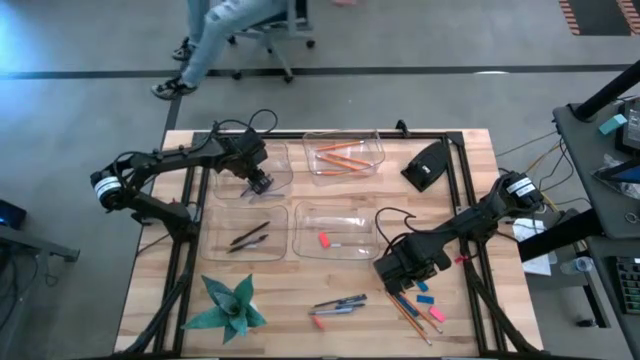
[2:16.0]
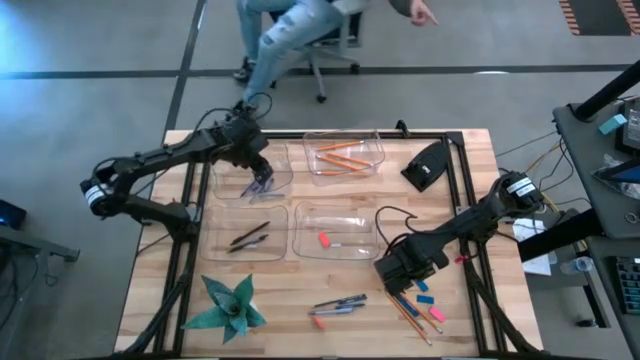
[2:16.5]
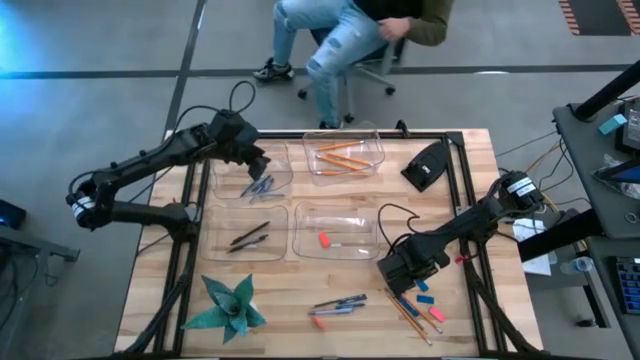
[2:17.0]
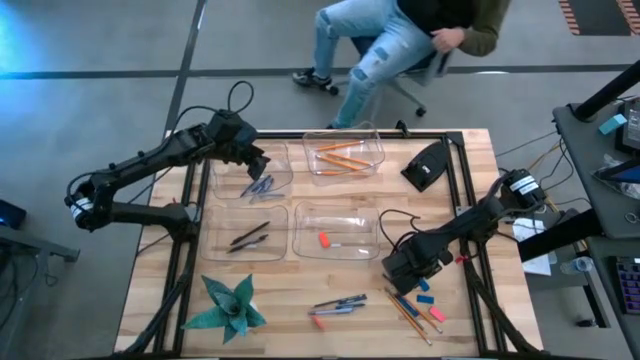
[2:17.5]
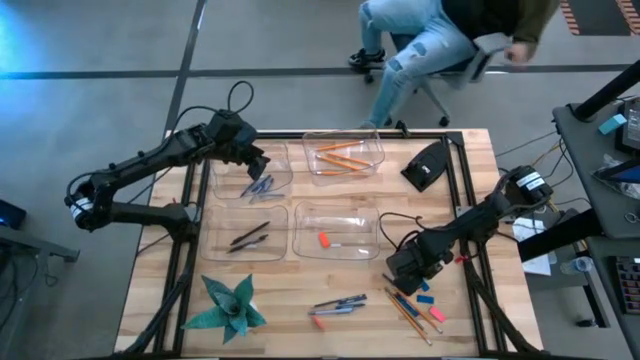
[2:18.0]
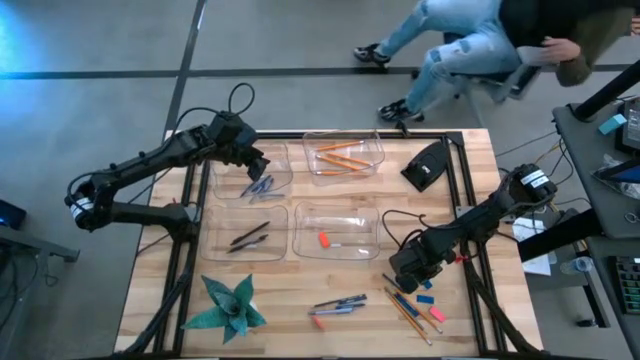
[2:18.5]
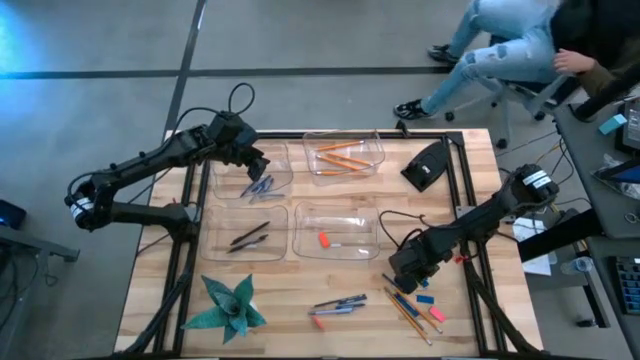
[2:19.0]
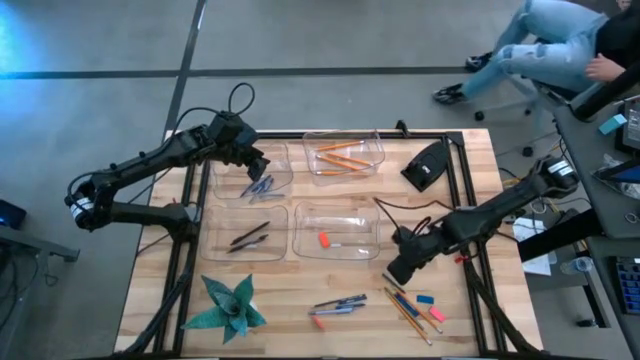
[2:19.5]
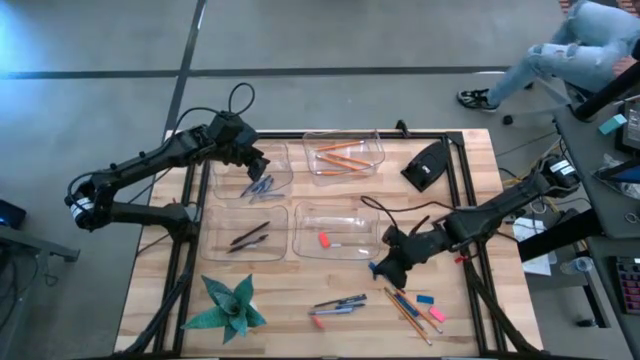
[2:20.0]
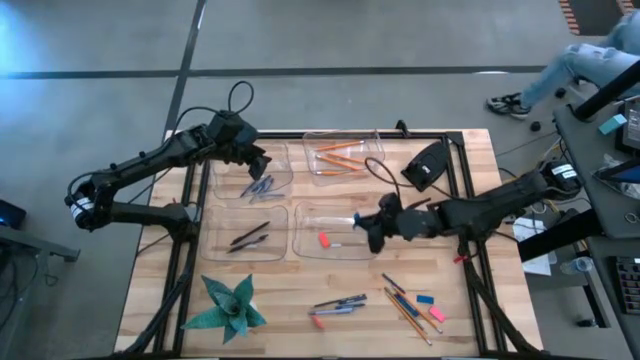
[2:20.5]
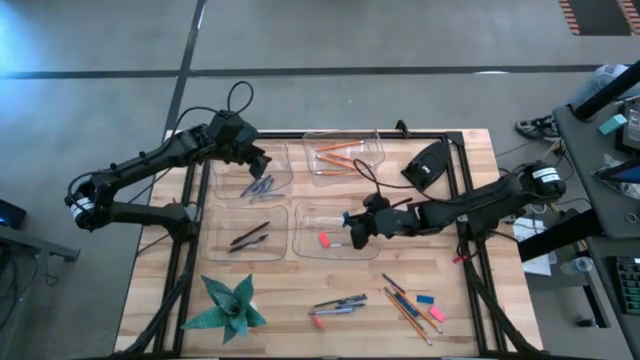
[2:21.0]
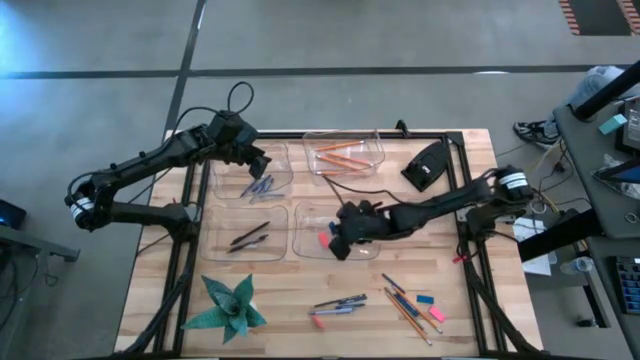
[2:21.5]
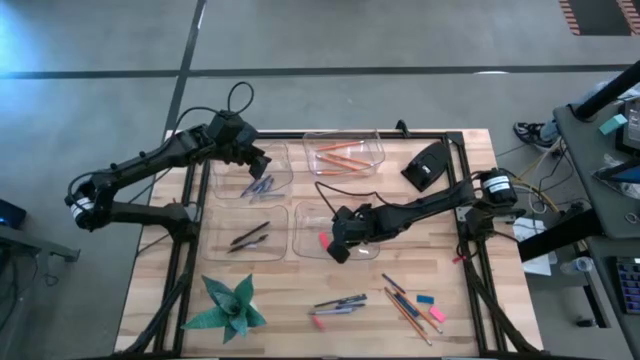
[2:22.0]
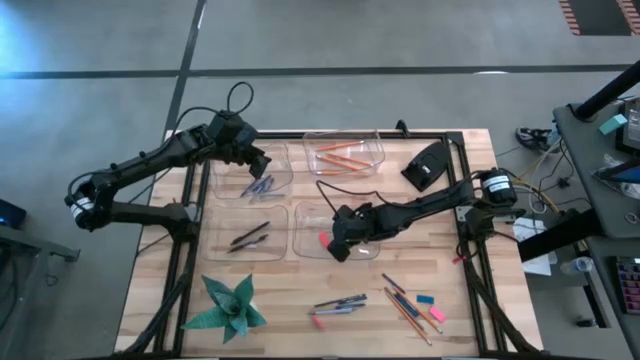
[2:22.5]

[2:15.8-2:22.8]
Task: Sort crayons/erasers/pens/pencils in bins
Put the blue eraser into the bottom right transparent bin

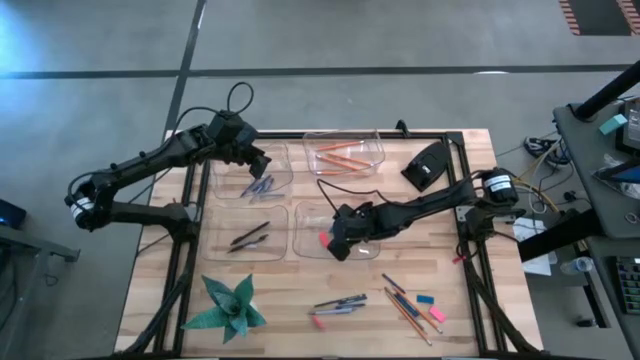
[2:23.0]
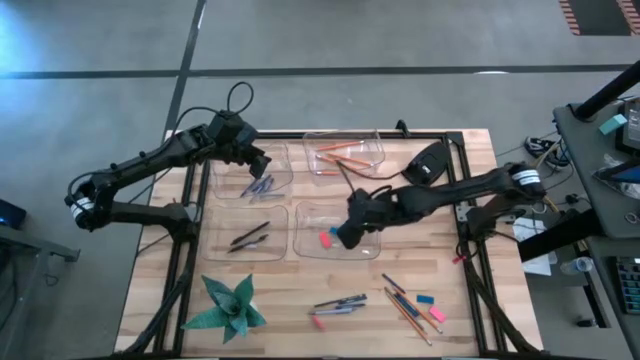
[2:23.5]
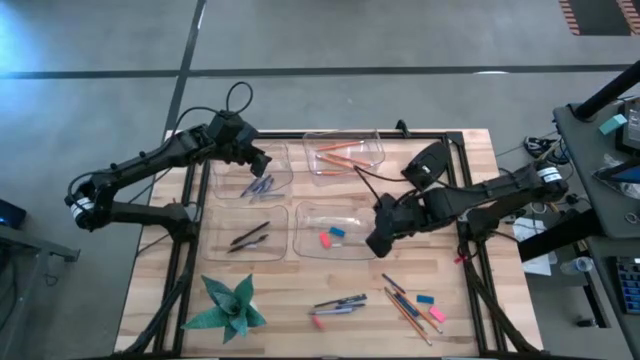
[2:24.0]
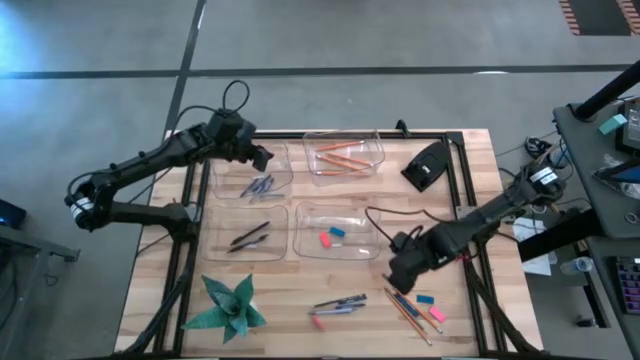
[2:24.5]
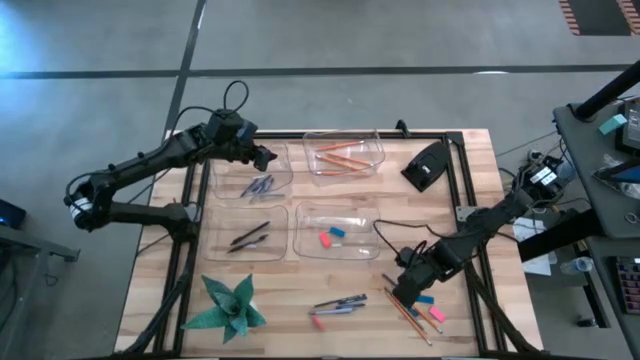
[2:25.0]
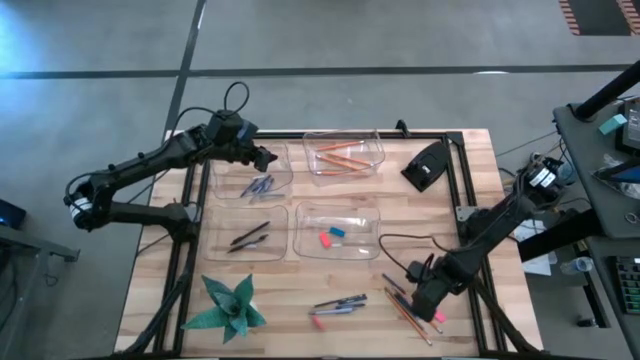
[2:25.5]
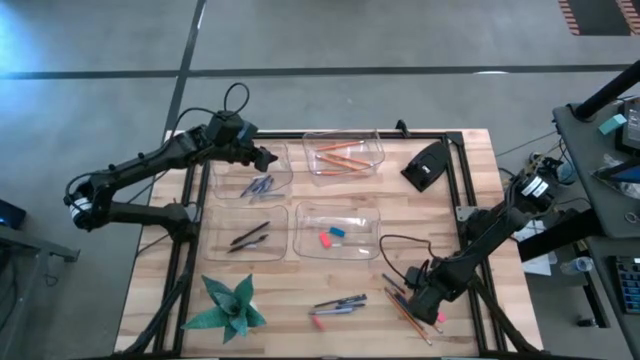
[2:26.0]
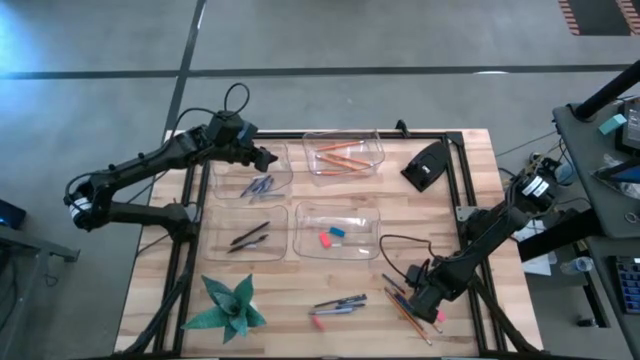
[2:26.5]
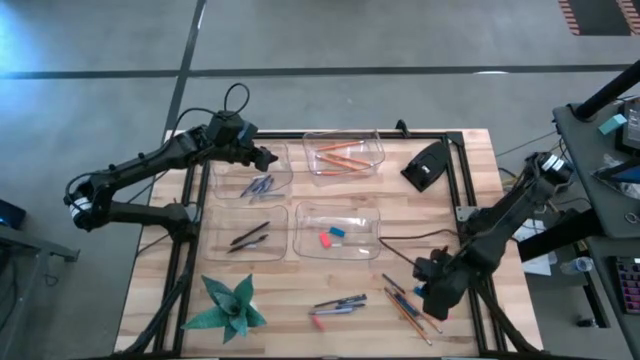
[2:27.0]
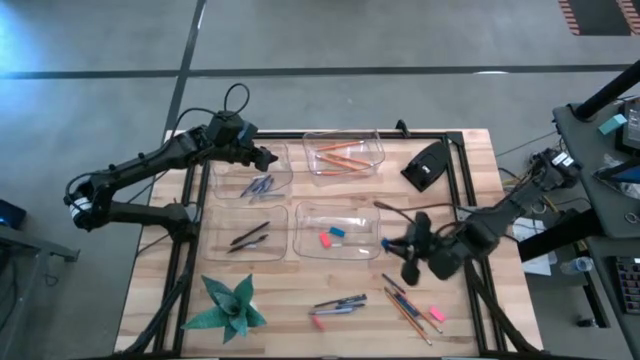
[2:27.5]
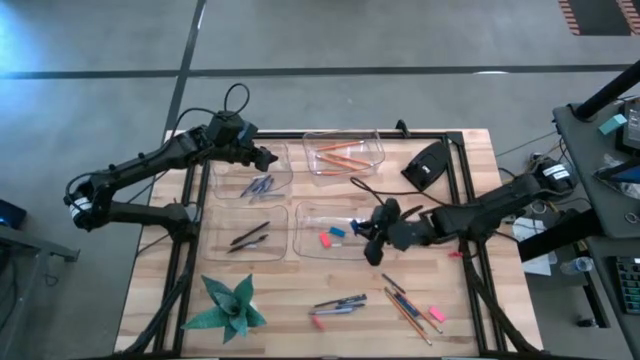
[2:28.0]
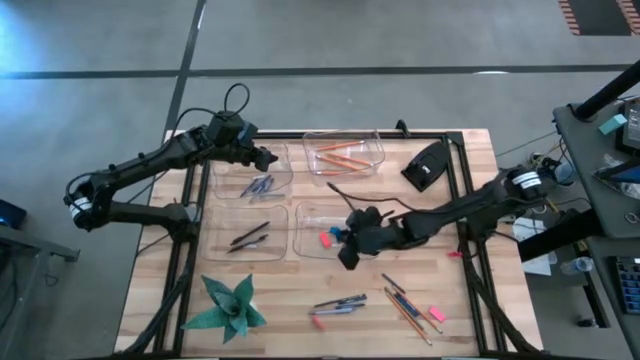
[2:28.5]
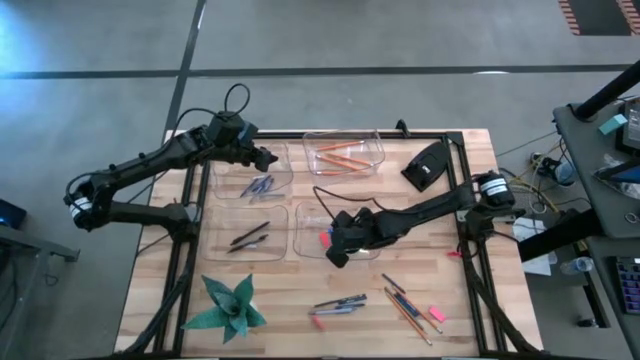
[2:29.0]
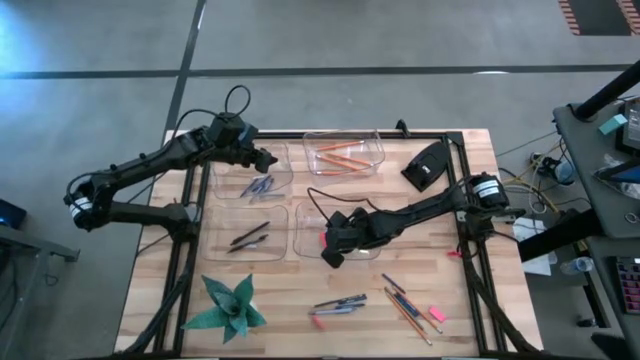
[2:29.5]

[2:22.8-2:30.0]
Put the blue eraser into the bottom right transparent bin

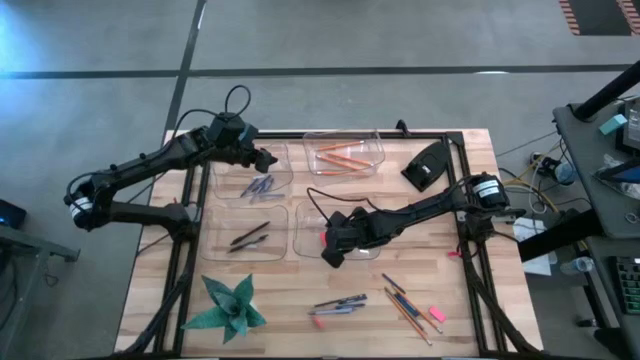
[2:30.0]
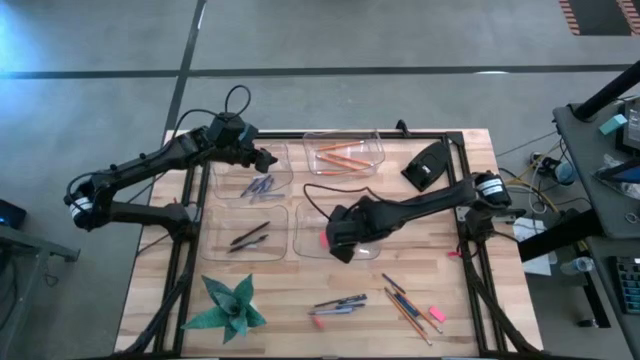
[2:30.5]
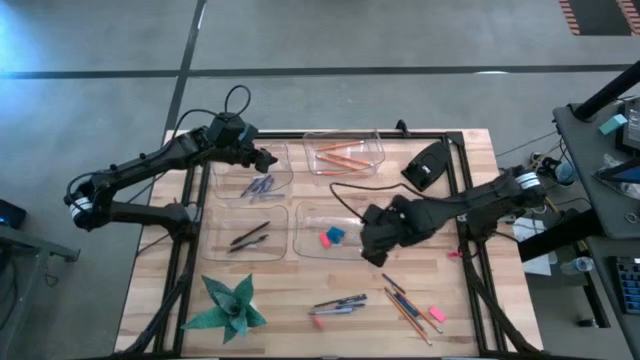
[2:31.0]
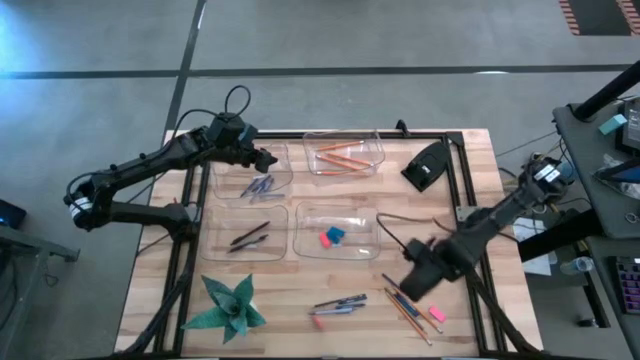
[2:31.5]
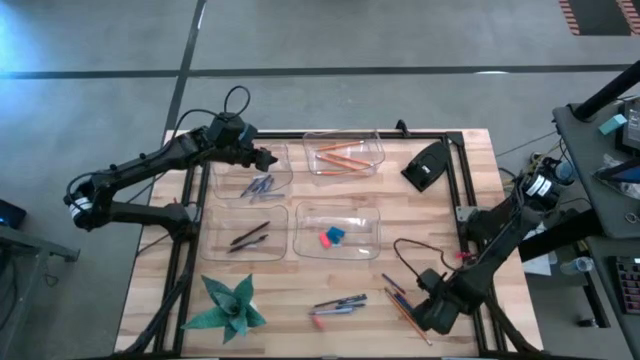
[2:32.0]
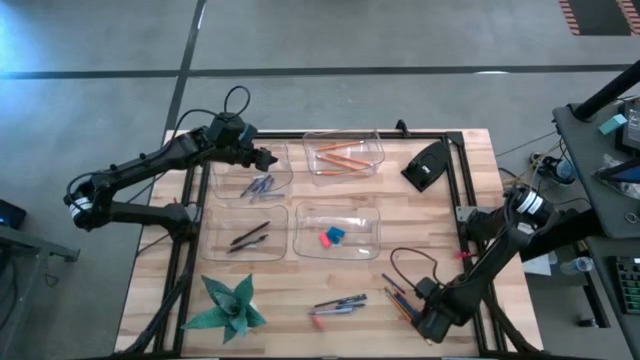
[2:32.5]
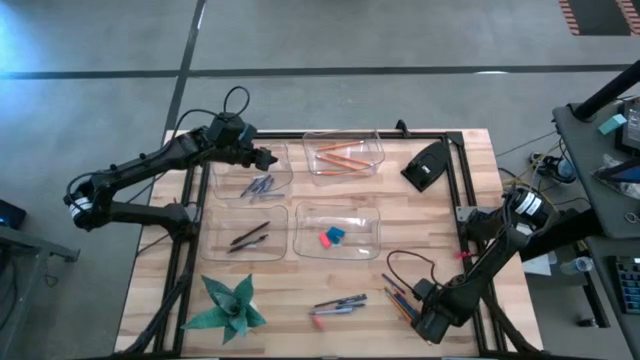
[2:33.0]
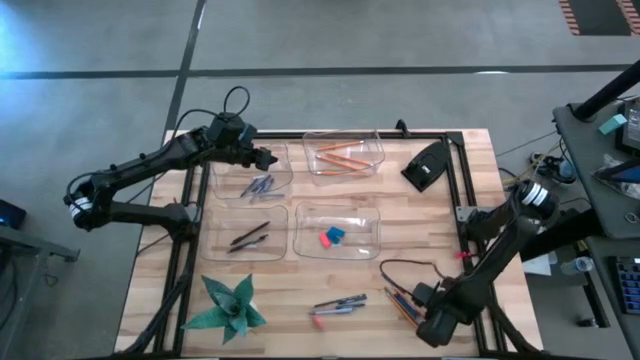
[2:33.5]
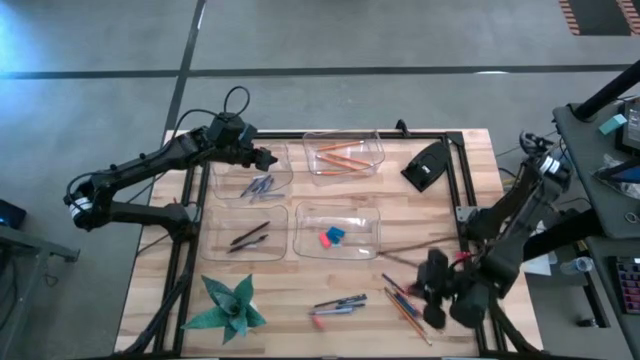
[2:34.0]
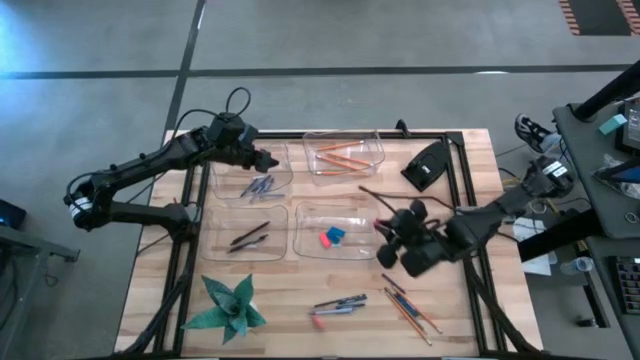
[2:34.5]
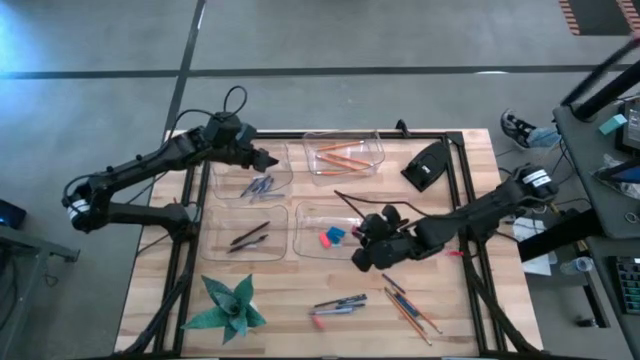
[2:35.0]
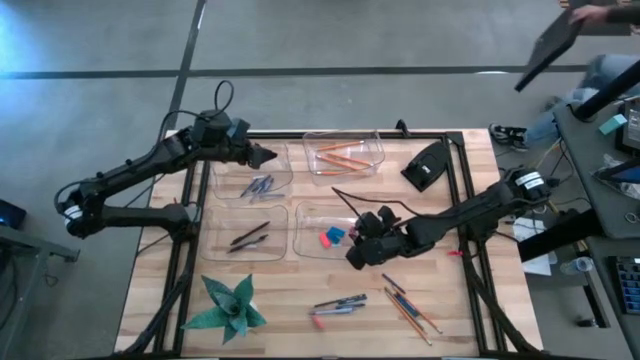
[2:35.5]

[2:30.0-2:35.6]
Put the pink eraser into the bottom right transparent bin

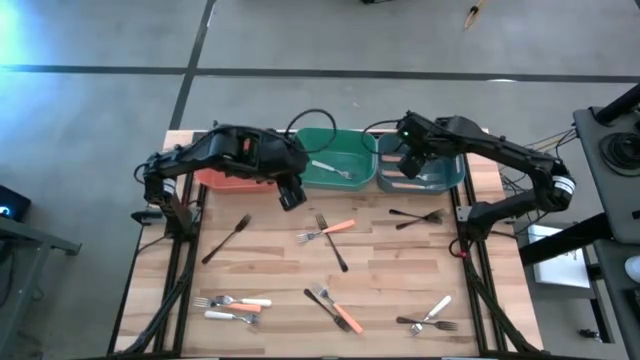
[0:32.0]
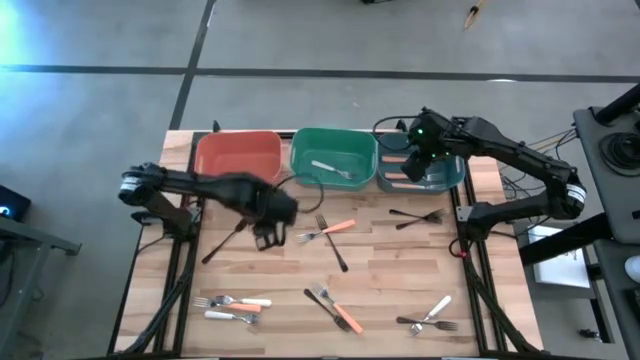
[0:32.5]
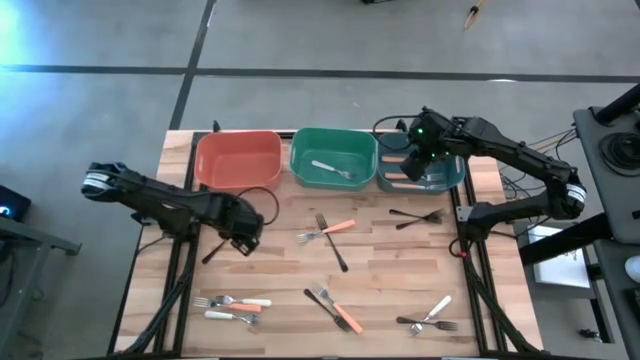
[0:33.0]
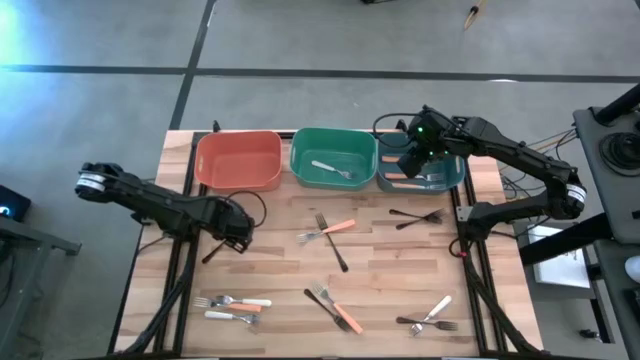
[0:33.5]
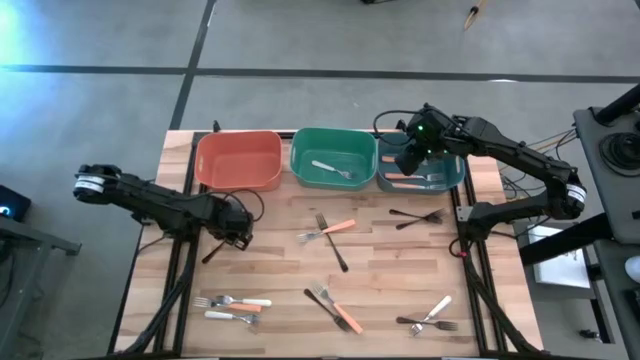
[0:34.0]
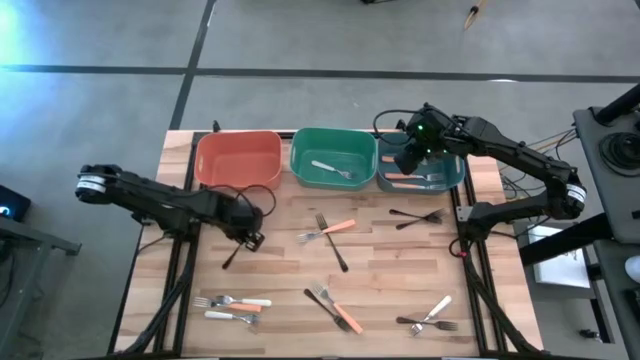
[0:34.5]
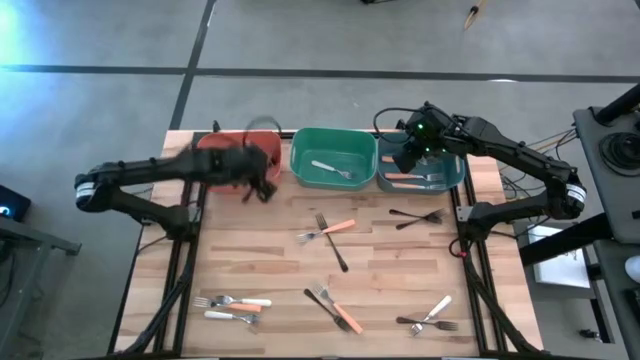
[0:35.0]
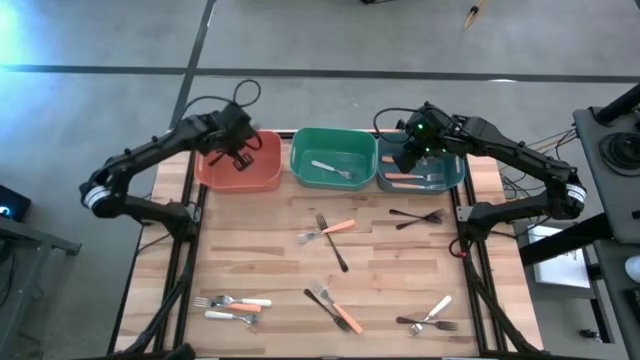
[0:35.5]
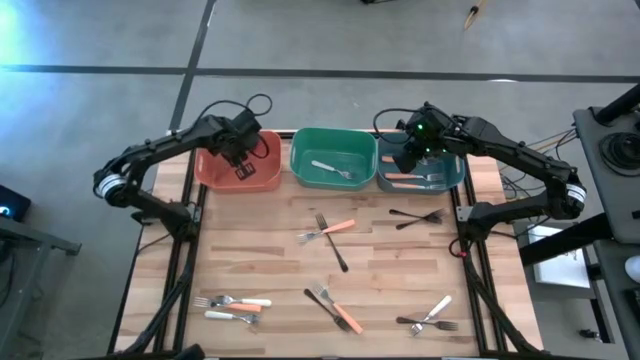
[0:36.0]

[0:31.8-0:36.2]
Task: Sort silverware by color (type)
Put the black fork into the orange bin
